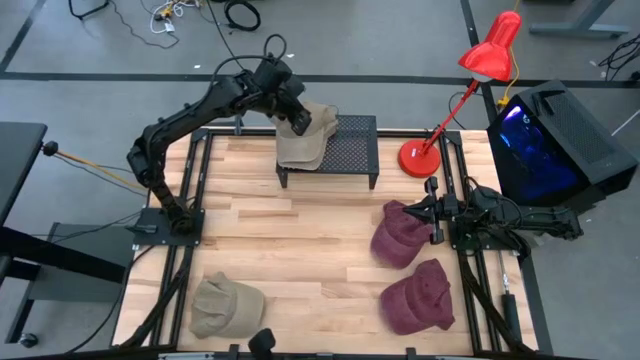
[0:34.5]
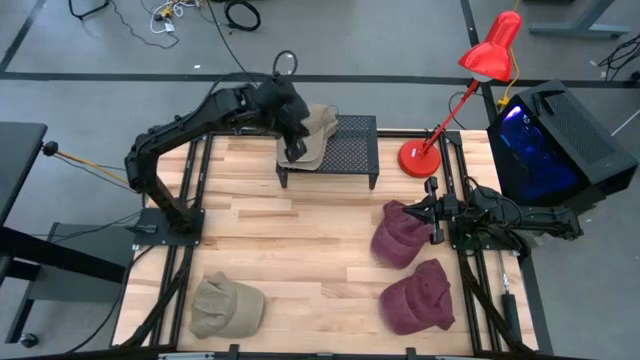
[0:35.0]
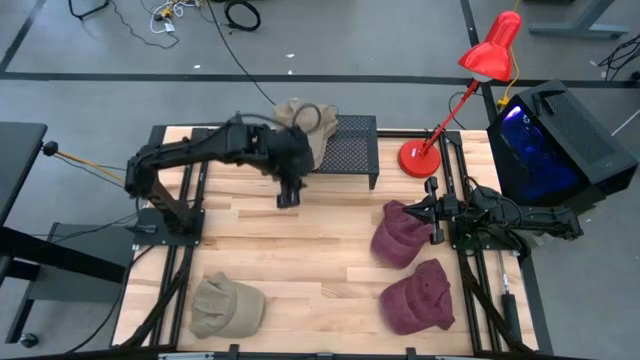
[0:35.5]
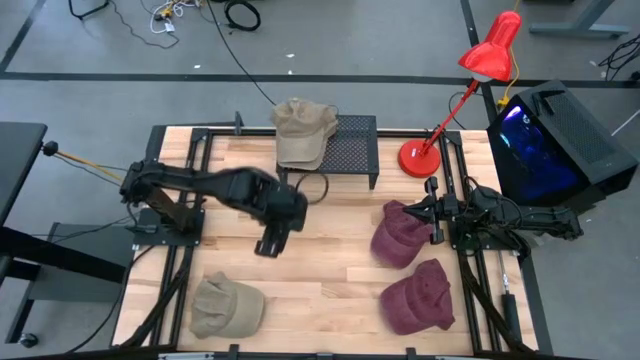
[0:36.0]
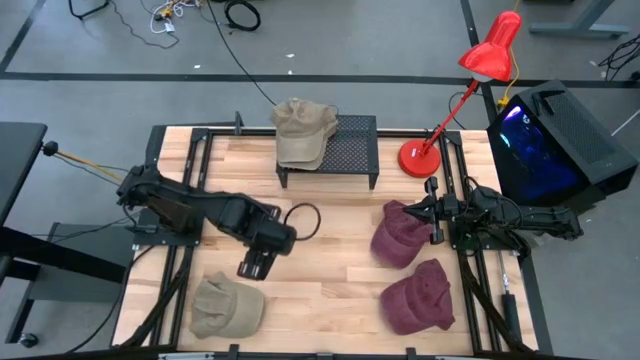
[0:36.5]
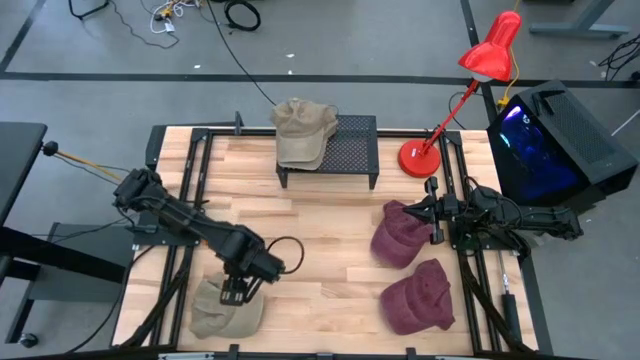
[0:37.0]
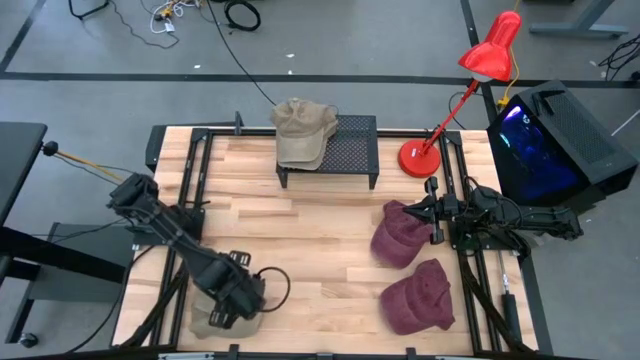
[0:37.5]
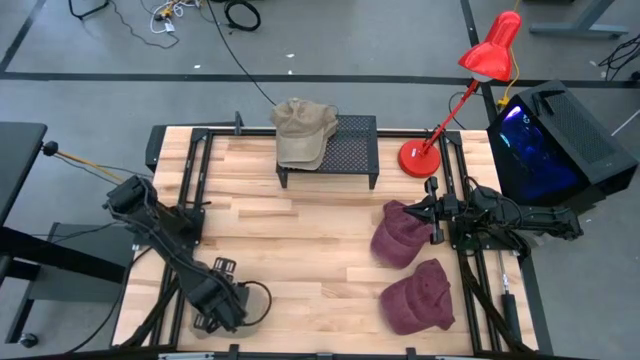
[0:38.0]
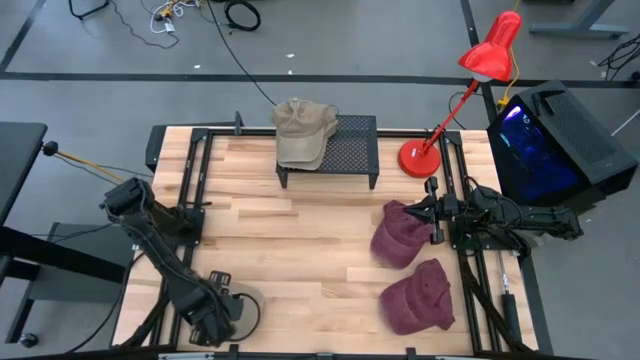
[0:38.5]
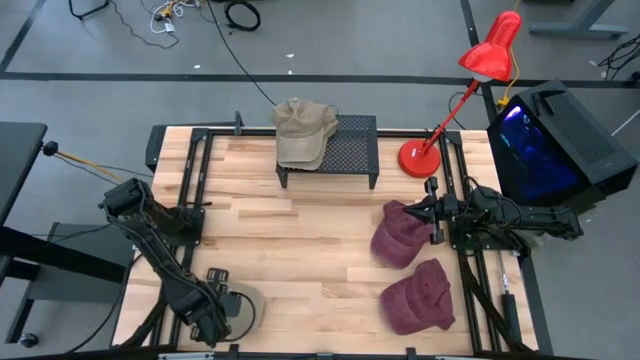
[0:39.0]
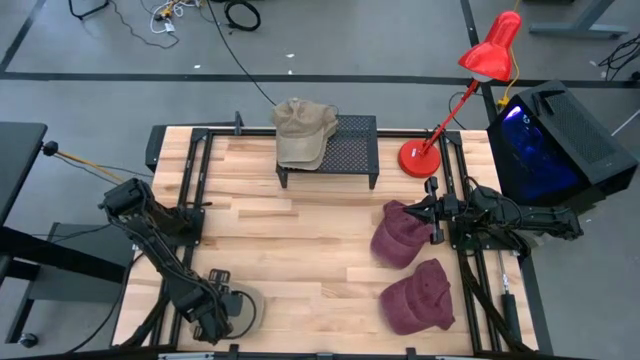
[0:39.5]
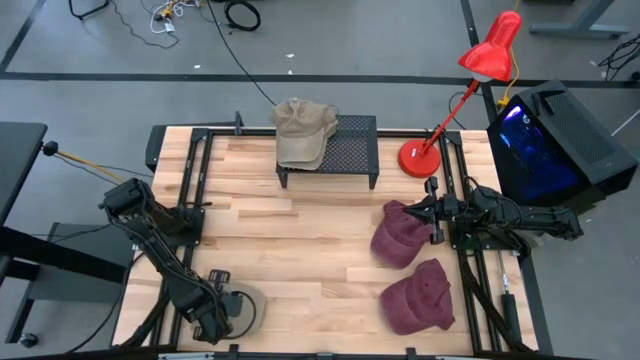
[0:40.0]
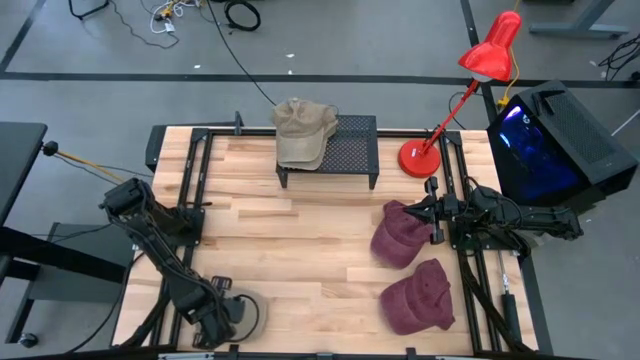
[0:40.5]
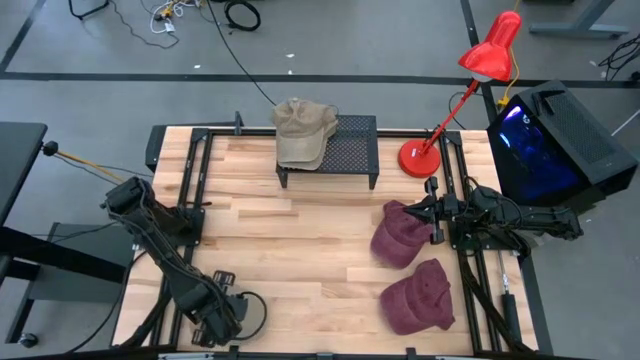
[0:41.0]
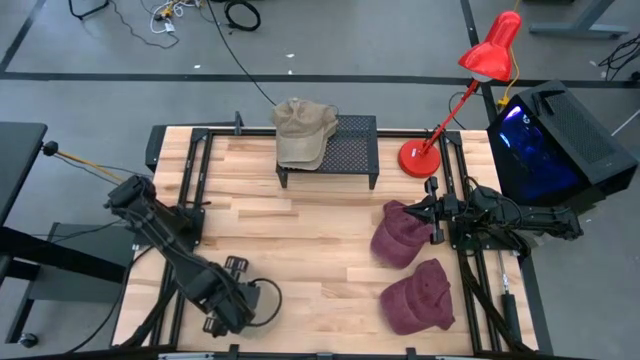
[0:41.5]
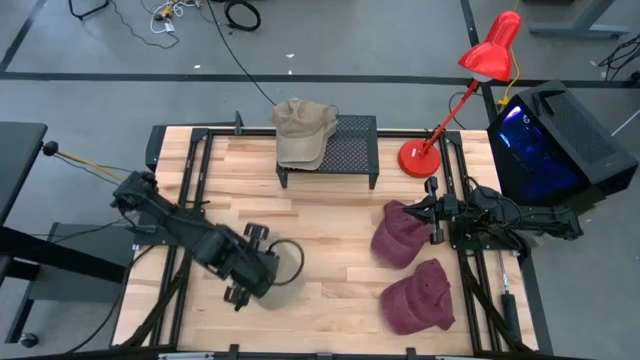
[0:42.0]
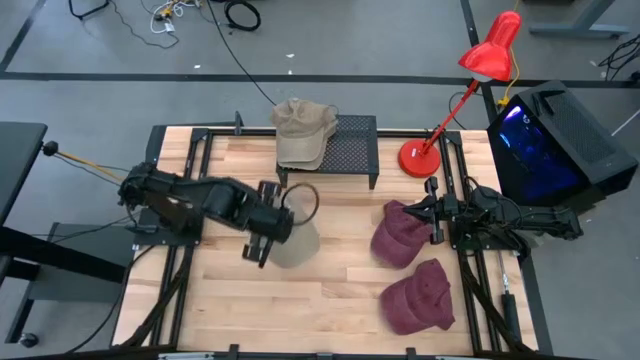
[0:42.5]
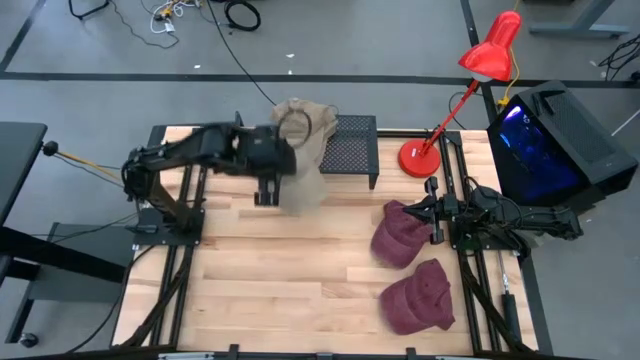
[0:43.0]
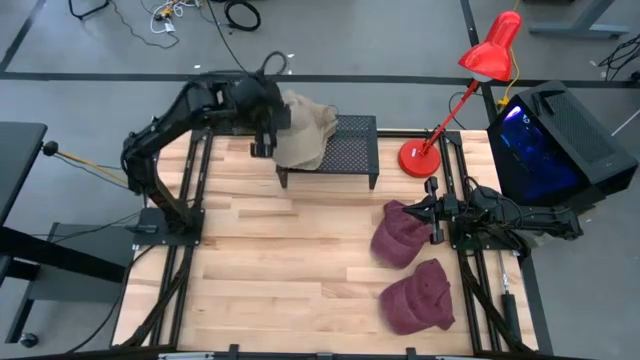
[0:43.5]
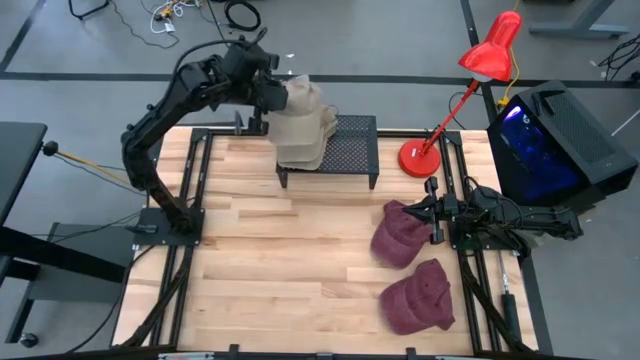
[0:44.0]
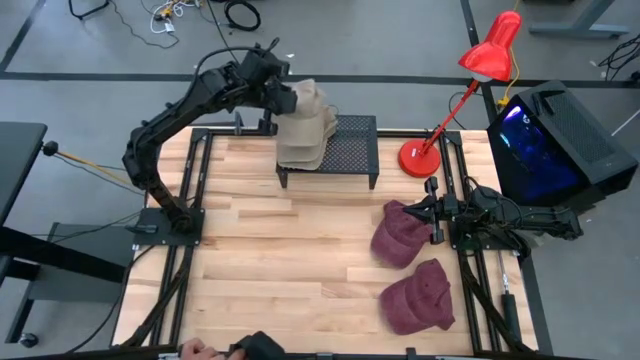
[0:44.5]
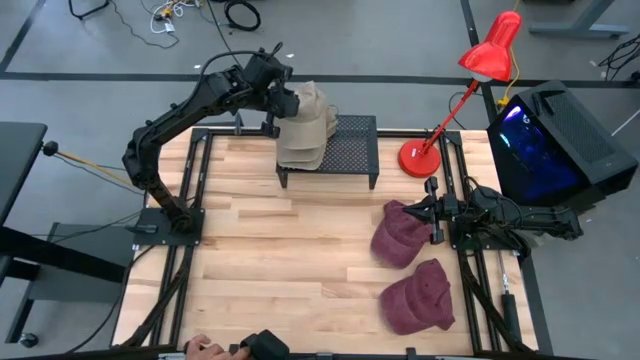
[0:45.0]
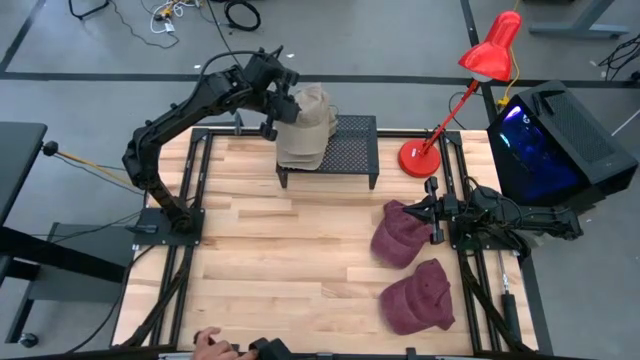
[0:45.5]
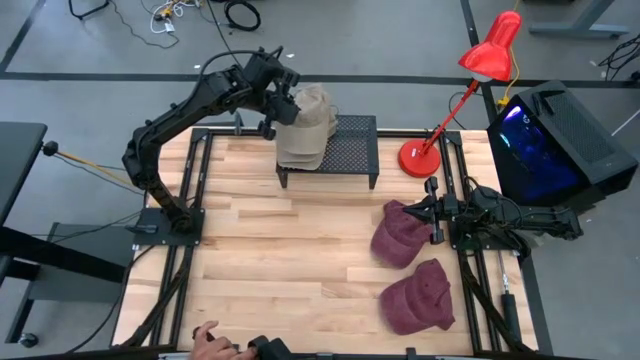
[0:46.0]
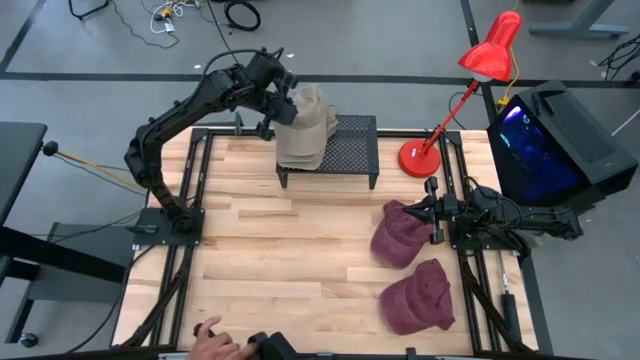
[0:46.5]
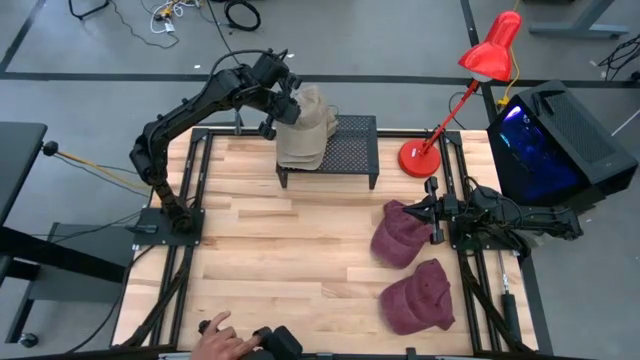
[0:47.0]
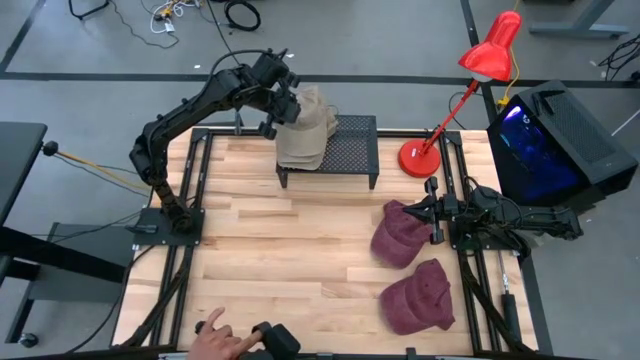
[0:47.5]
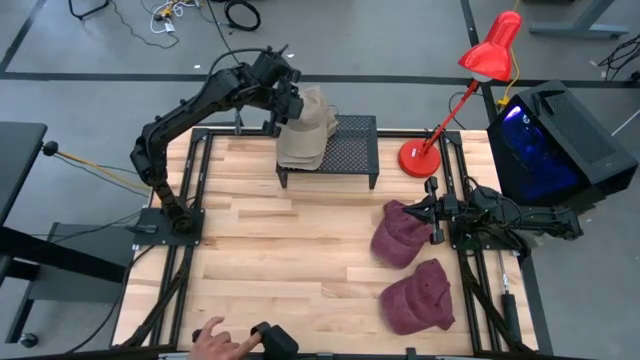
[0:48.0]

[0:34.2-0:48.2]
Task: Pick & Place hat
Stack the brown cap on top of the other brown cap on the shelf

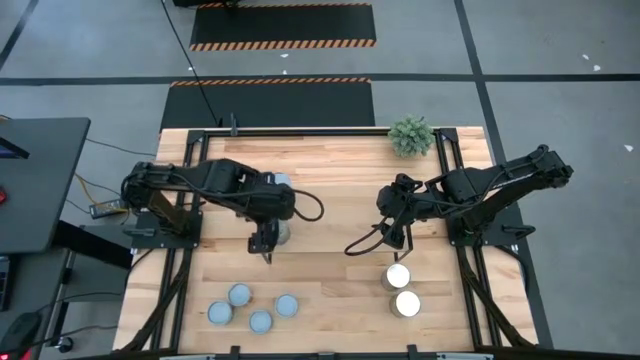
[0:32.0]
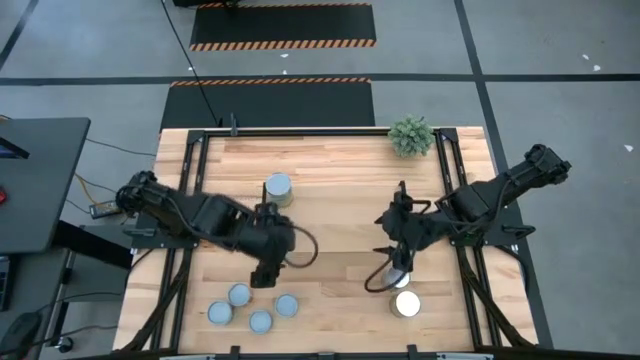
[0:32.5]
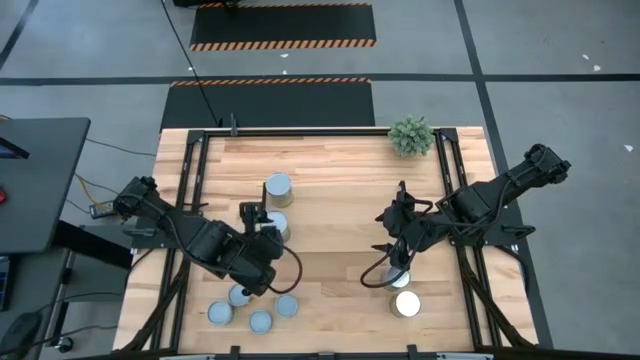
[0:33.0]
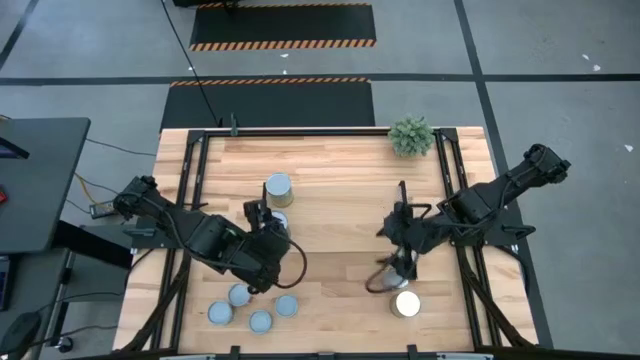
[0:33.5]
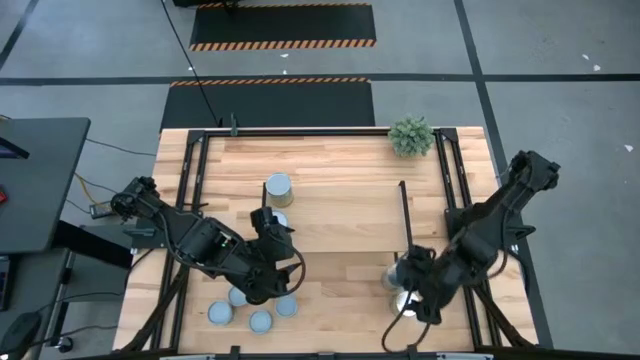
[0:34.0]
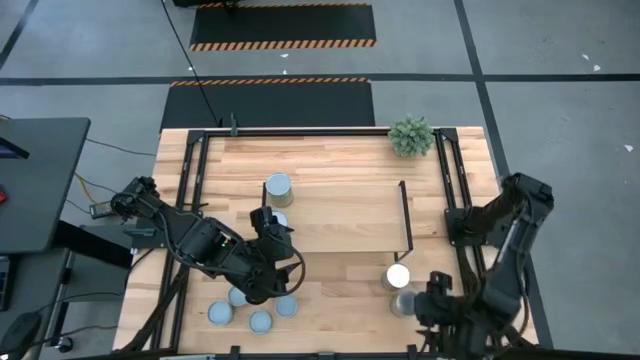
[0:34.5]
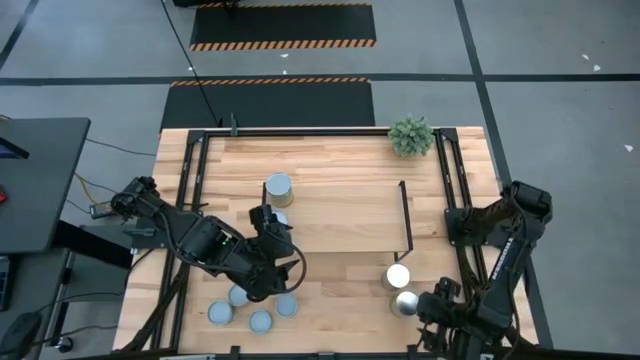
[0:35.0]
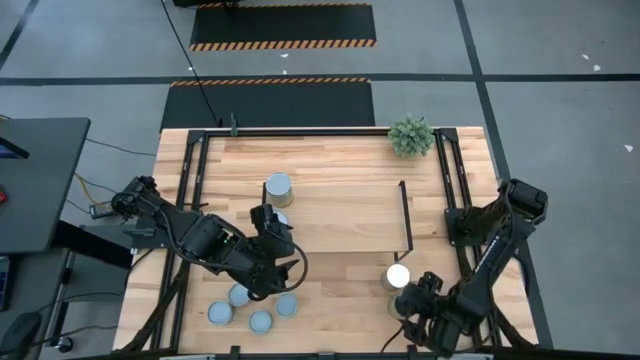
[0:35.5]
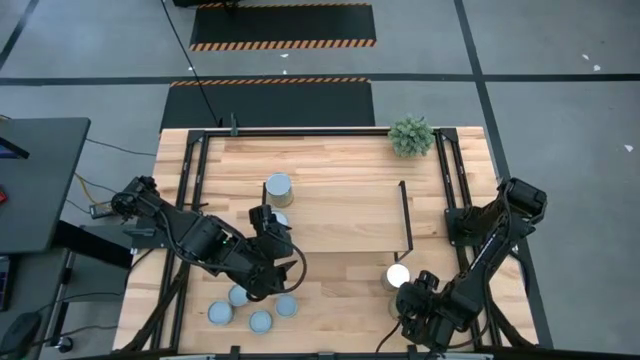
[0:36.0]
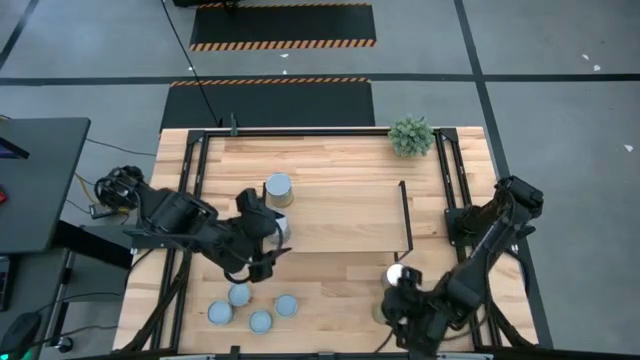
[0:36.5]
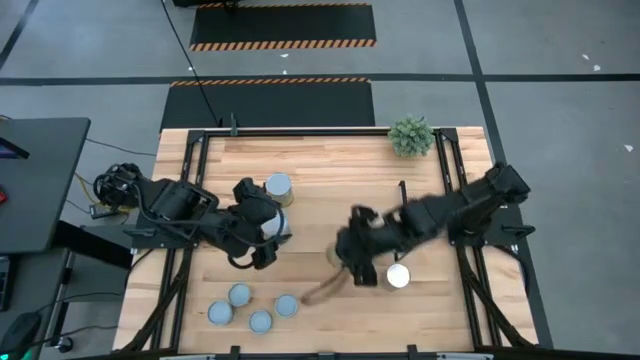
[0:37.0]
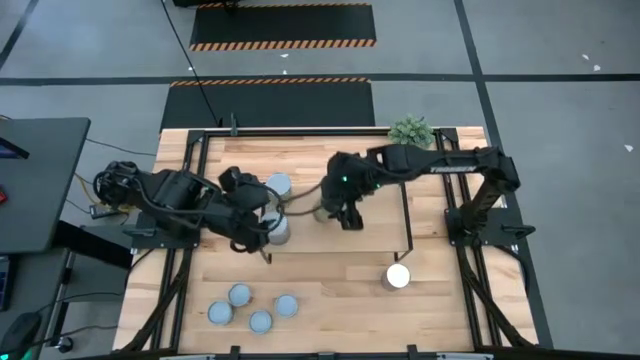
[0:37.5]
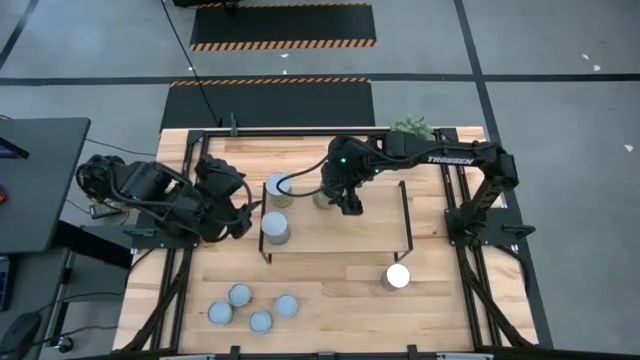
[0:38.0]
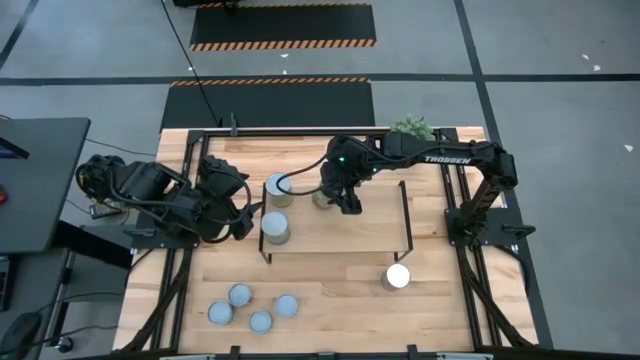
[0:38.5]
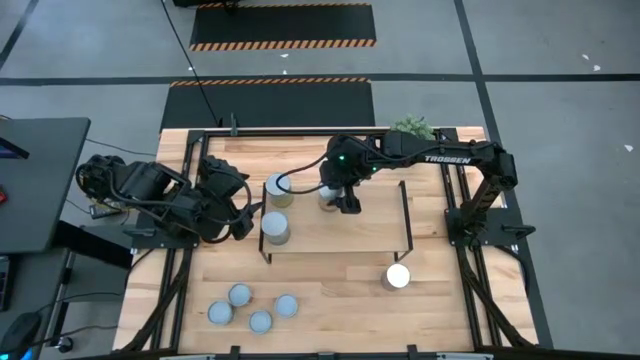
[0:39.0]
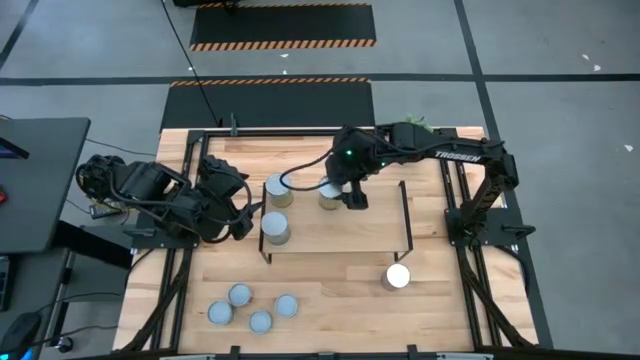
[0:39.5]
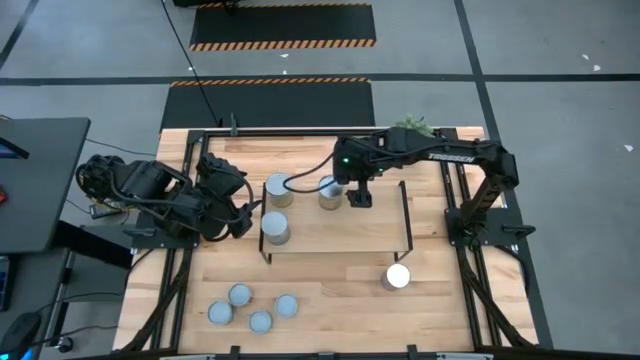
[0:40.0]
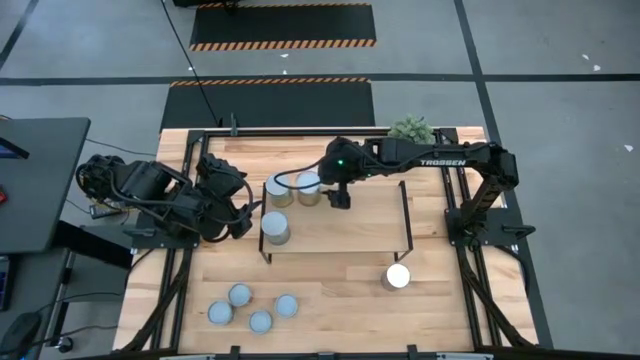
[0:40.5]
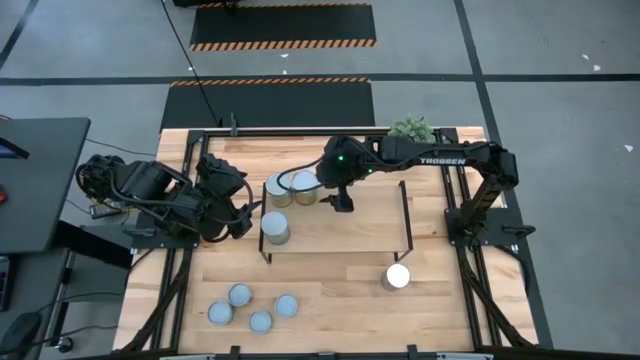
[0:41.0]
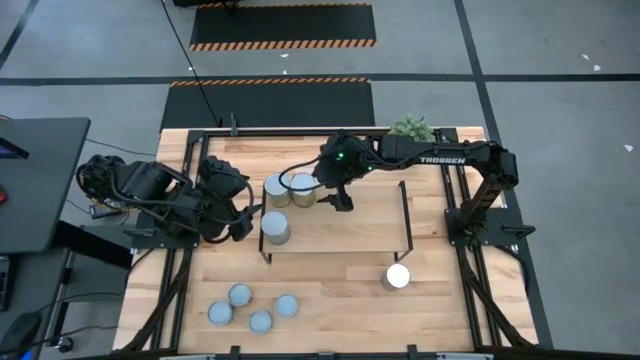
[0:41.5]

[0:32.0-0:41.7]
Task: Pick and place cans onto a shelf
Put the canned oranges on the shelf
